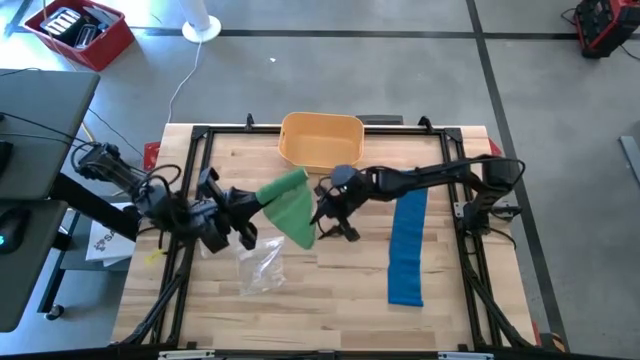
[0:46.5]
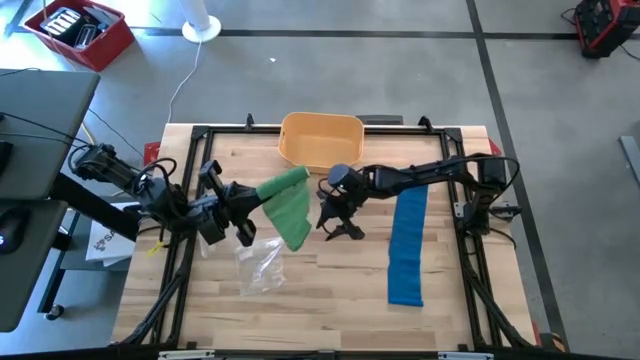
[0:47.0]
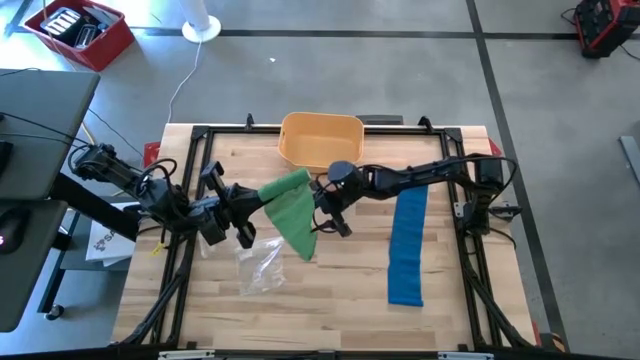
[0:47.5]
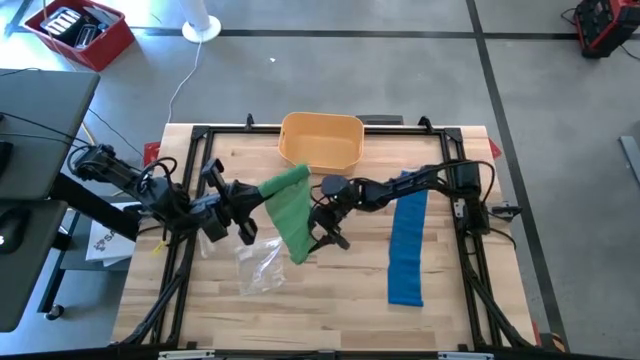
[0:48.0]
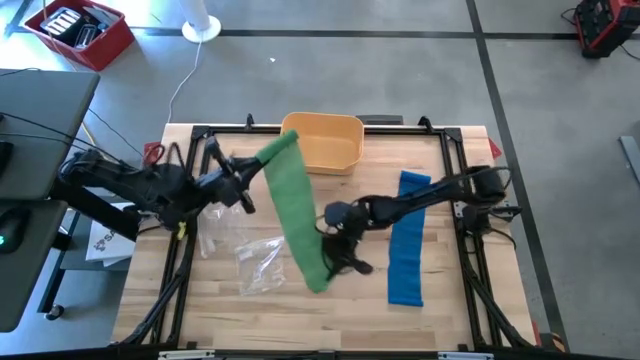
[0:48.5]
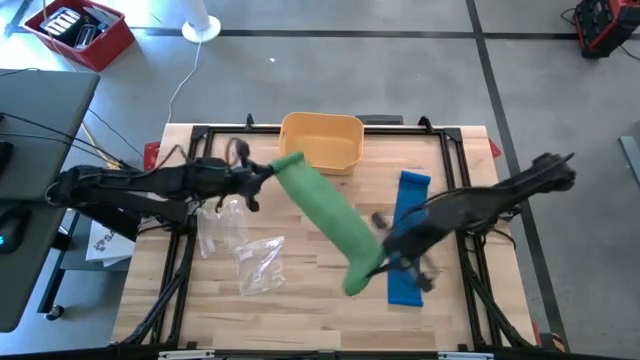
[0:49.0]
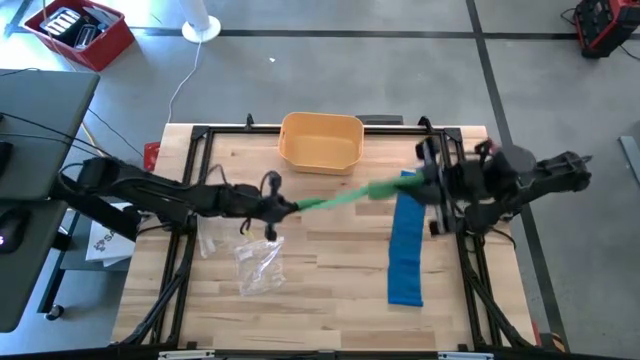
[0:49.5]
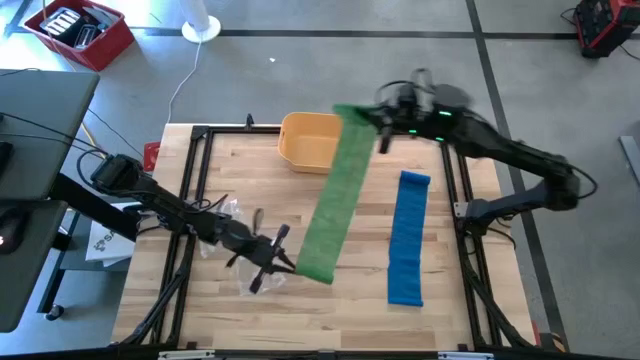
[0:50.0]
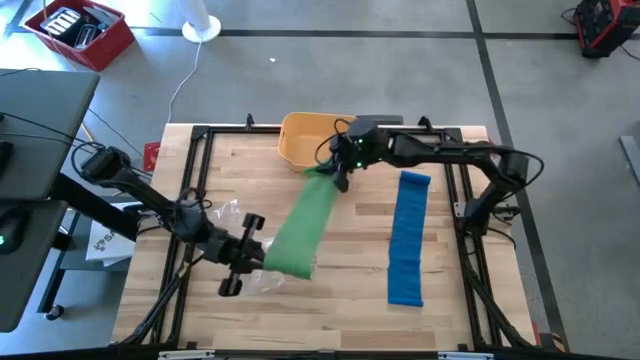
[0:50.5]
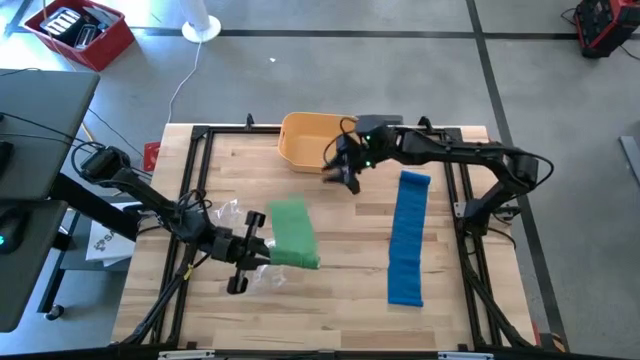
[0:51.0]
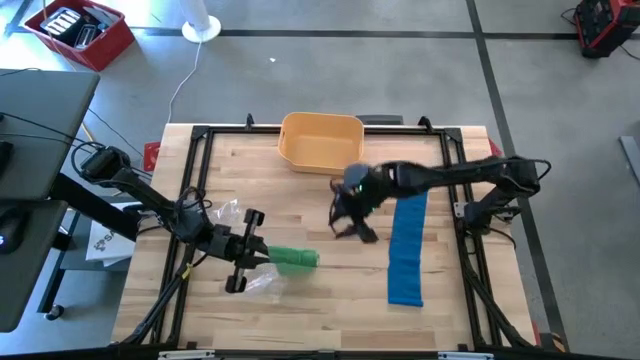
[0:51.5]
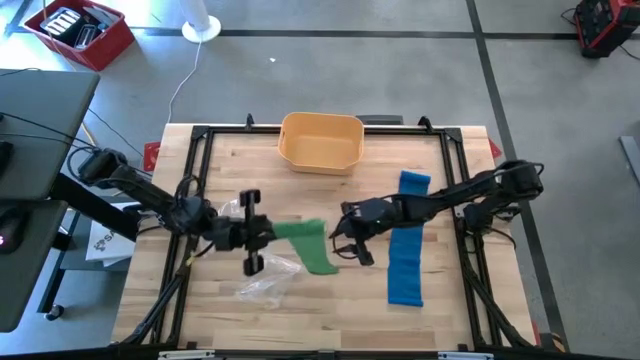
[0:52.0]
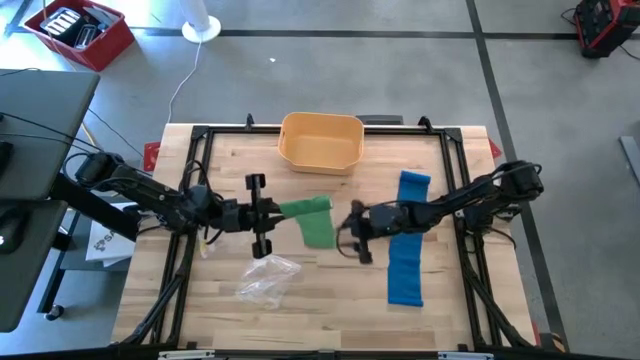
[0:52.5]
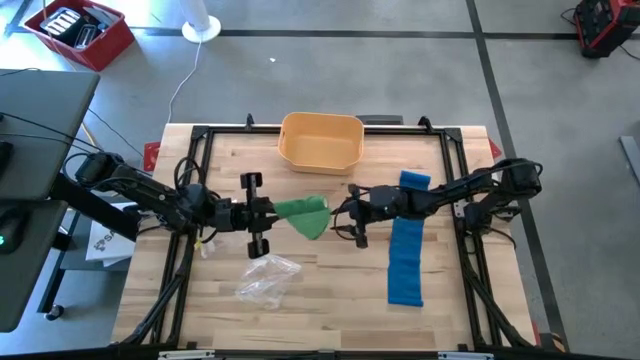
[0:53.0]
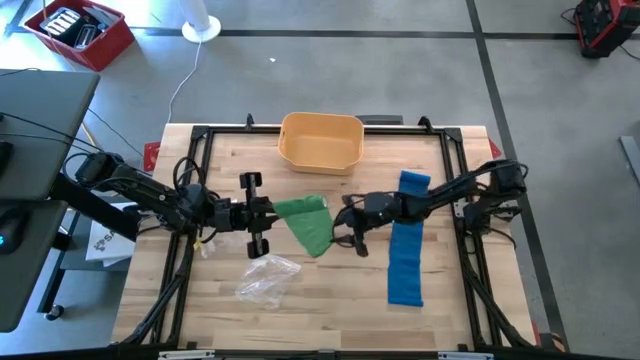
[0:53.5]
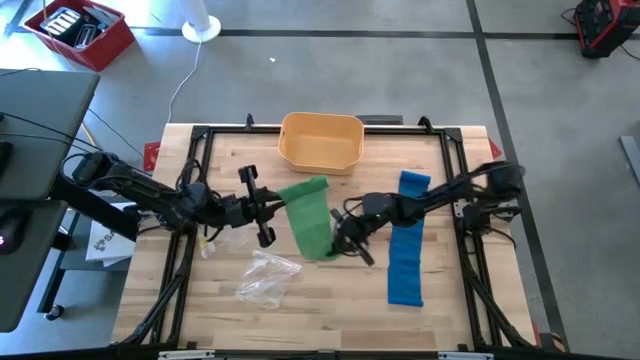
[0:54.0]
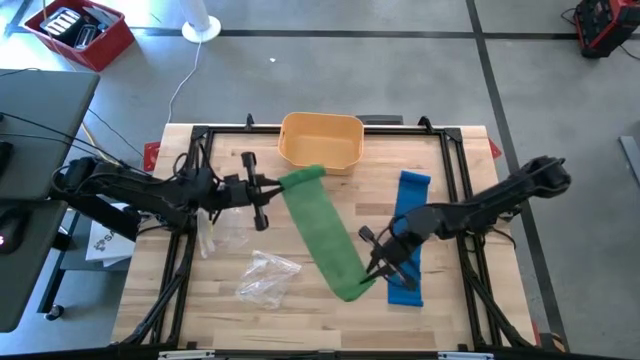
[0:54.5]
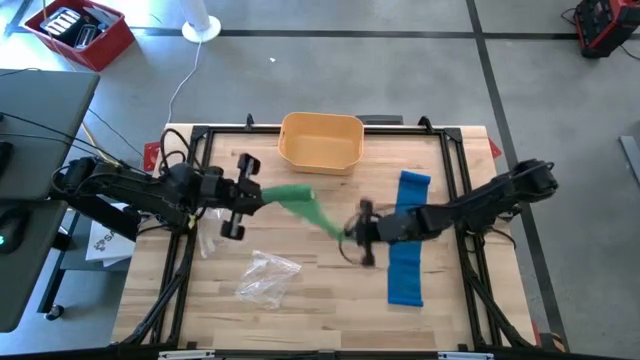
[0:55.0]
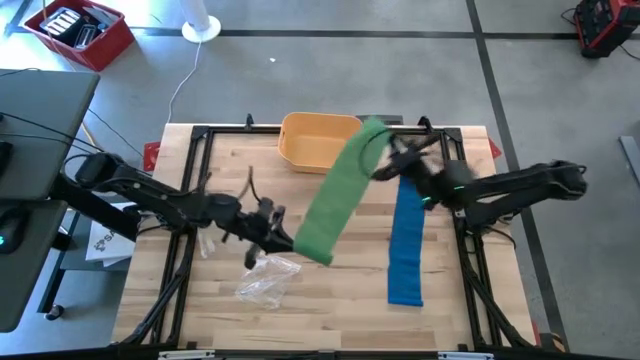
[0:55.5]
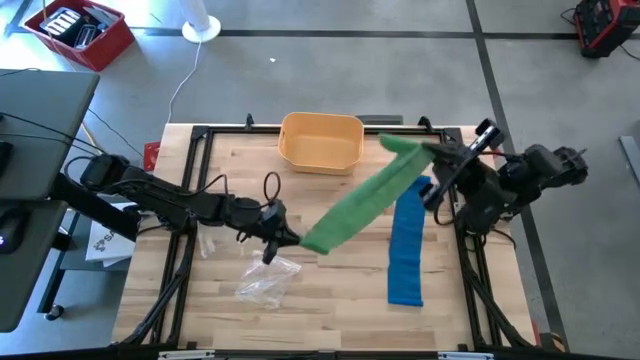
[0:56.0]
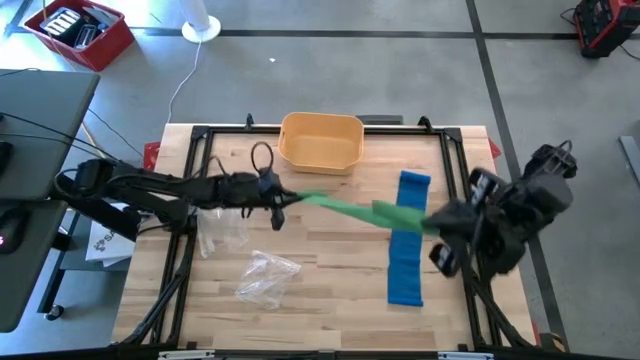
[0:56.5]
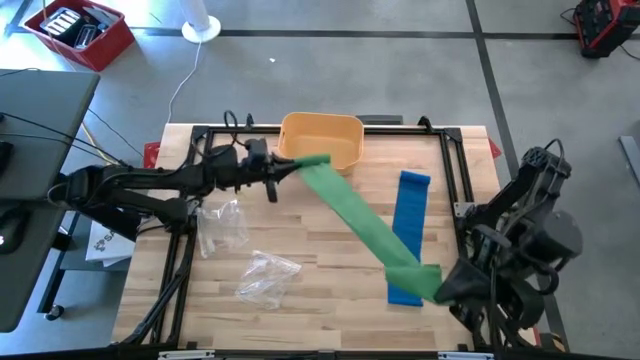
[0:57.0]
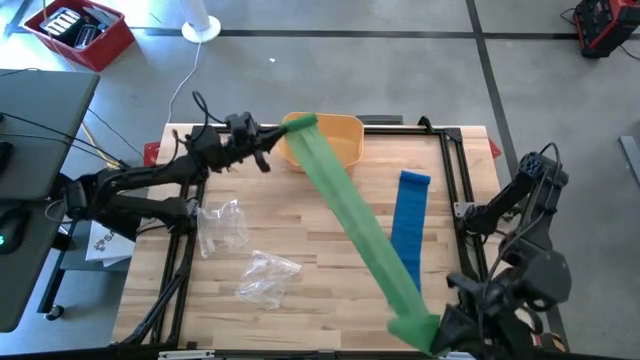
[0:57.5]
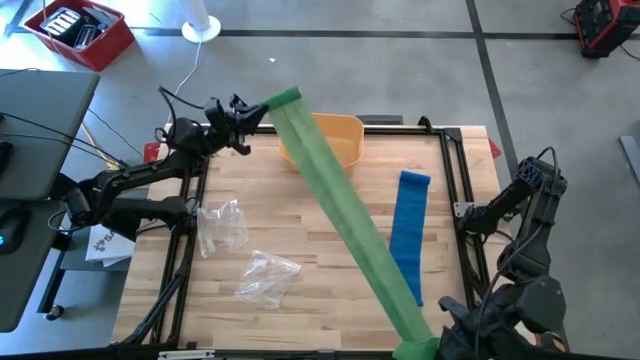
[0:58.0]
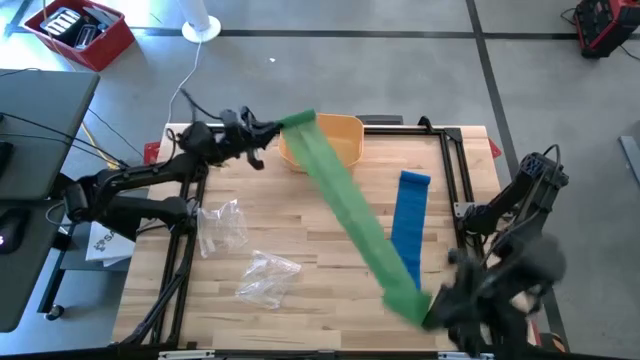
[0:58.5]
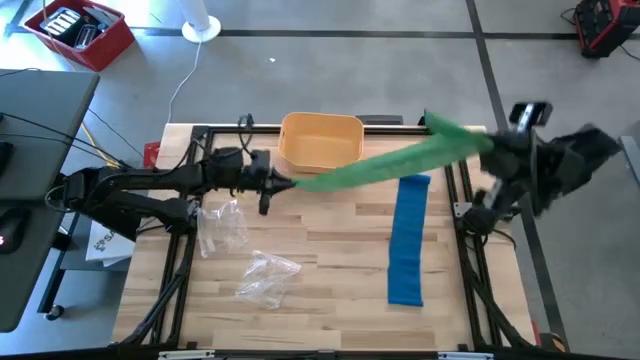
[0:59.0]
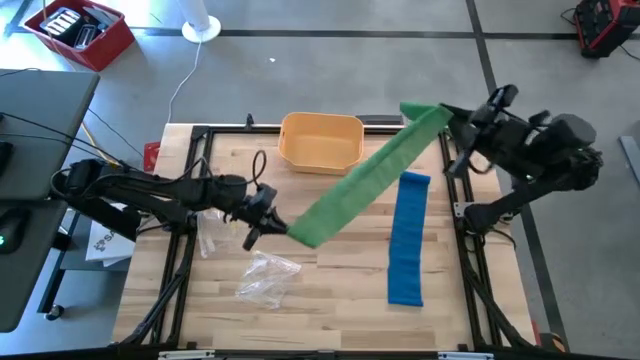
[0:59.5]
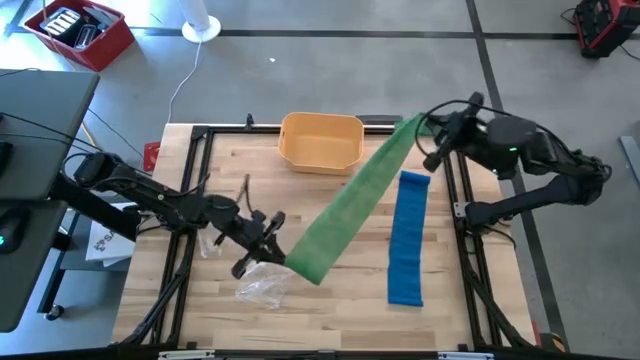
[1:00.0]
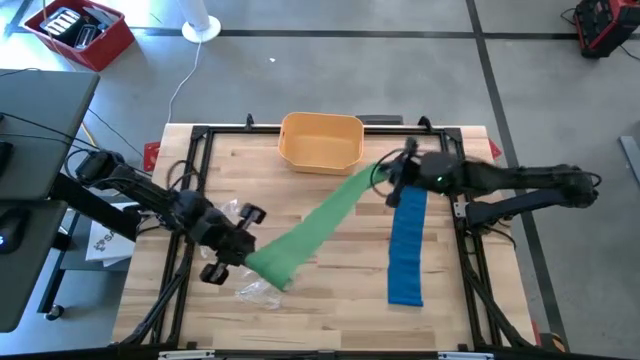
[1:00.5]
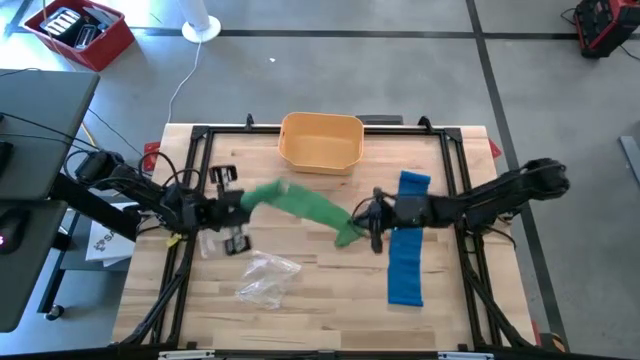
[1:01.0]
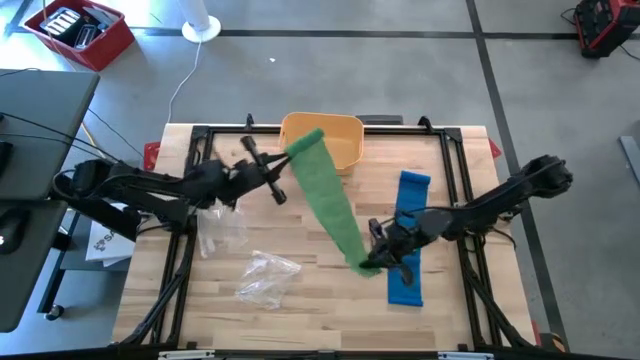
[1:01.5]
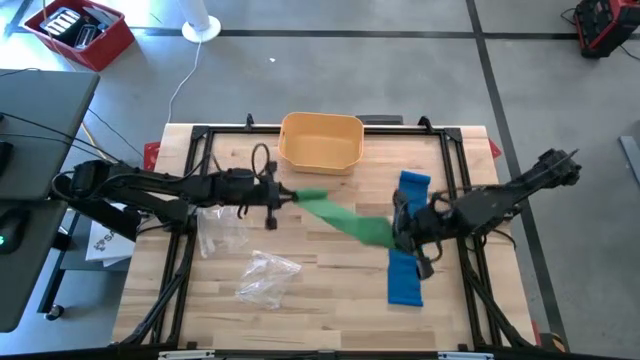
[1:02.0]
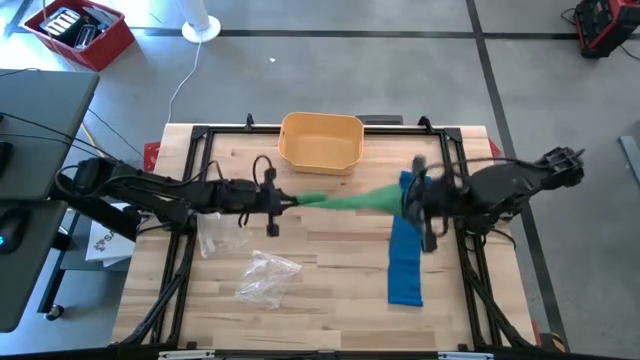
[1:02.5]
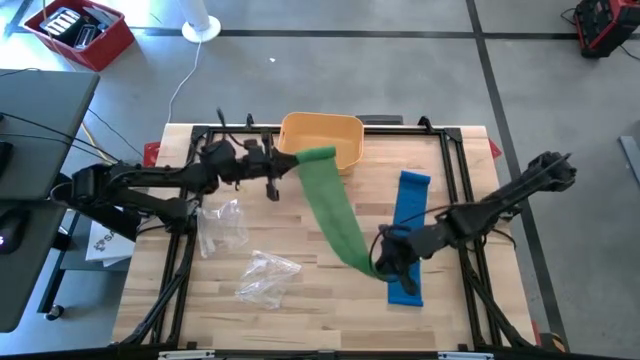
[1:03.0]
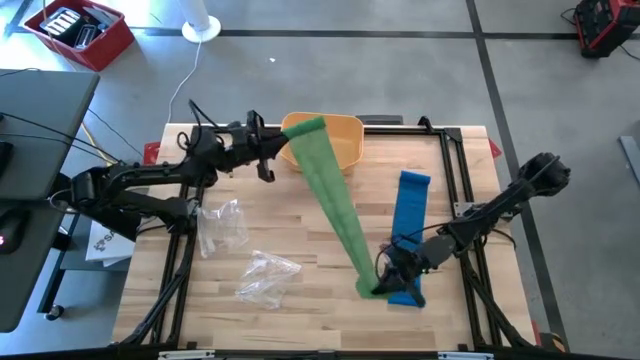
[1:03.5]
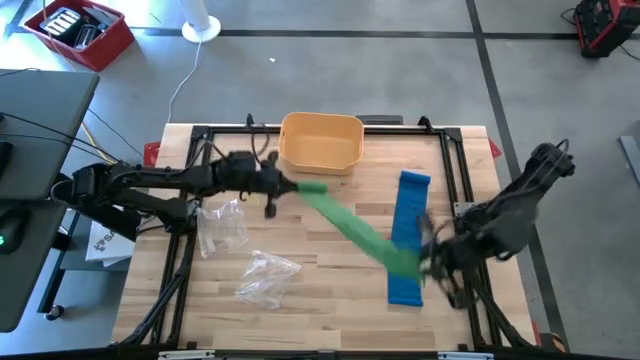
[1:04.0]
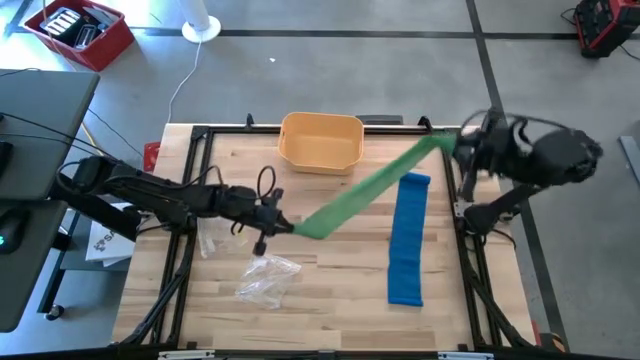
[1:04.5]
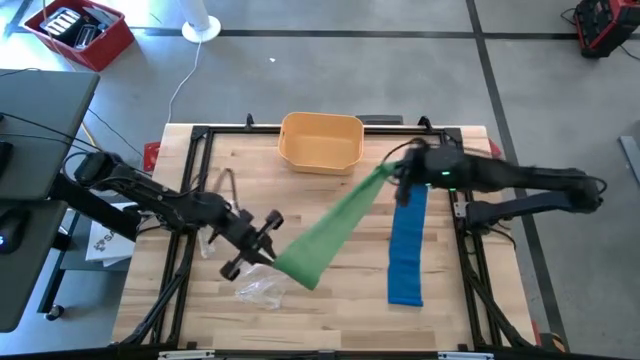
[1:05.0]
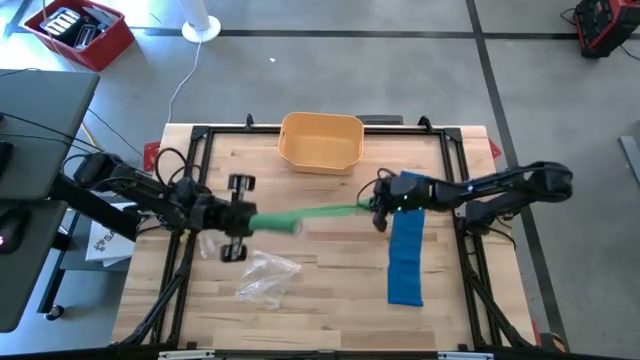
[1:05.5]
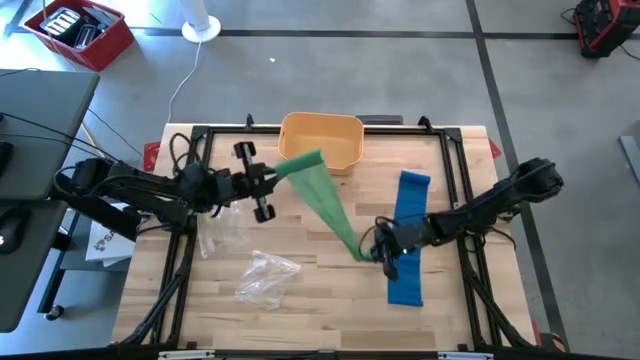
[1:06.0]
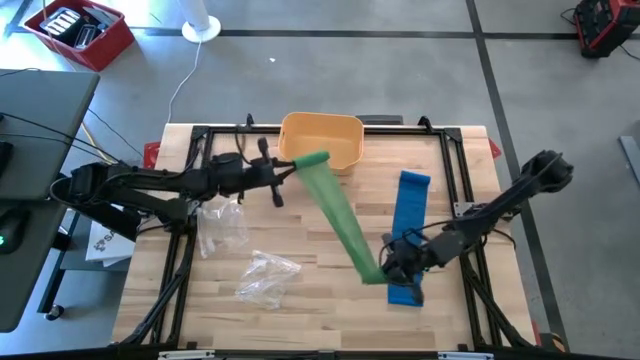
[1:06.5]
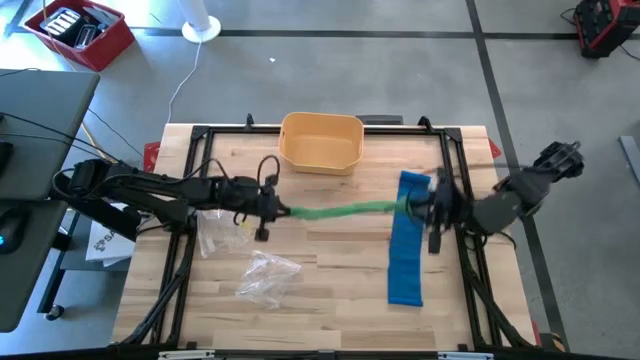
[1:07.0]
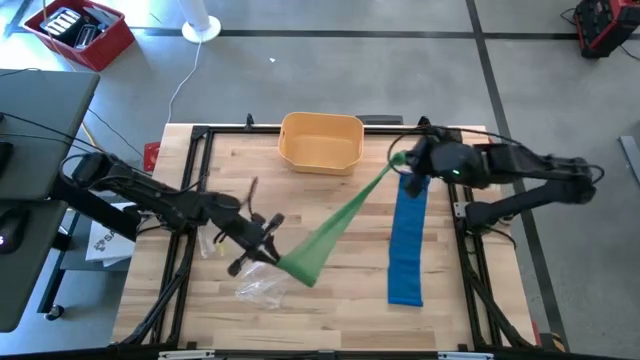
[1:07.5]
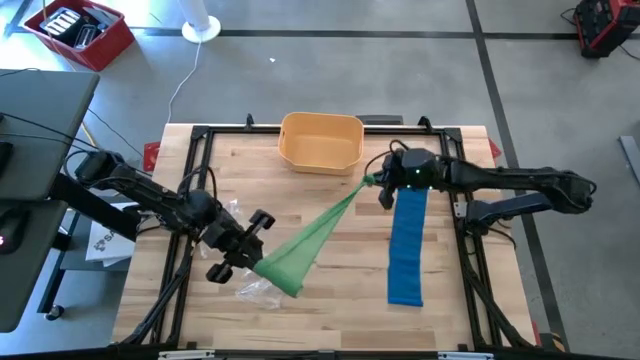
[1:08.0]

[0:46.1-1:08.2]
Task: Roll bandage
Roll the green bandage
